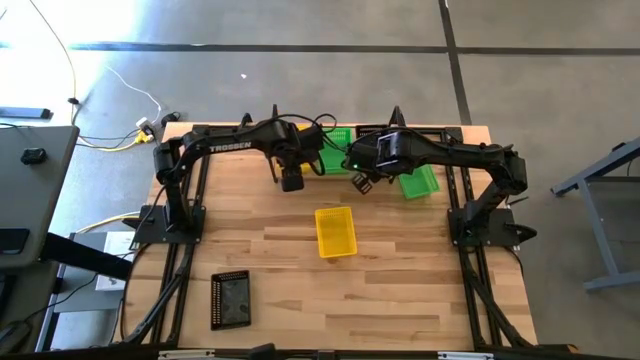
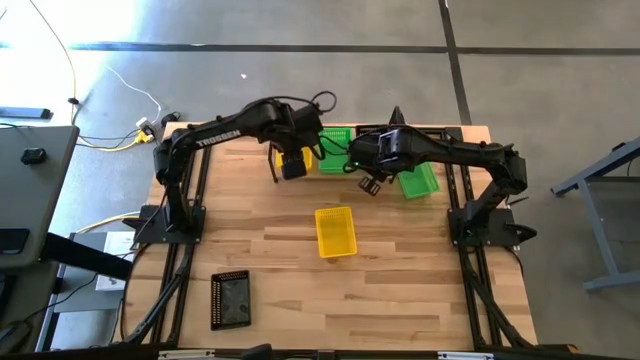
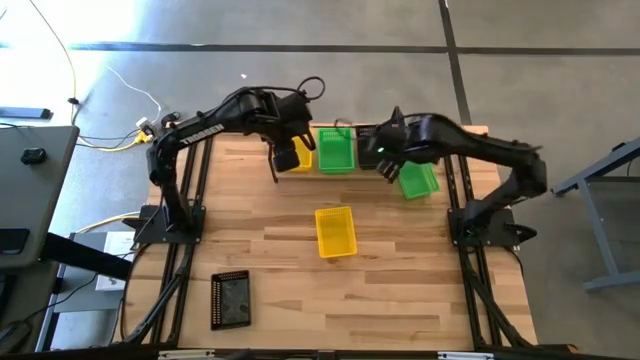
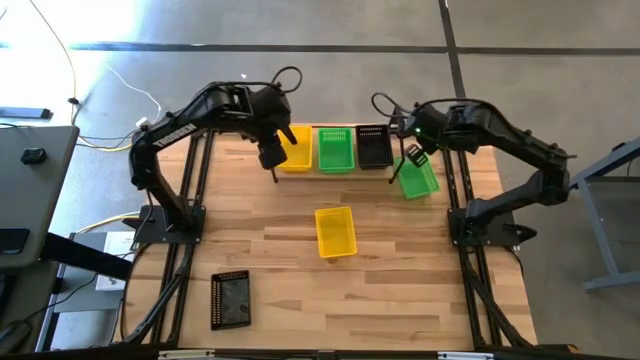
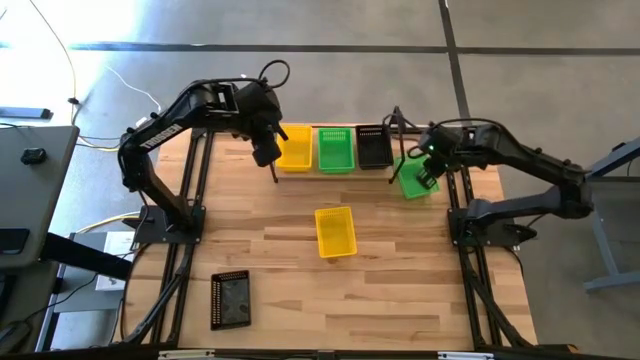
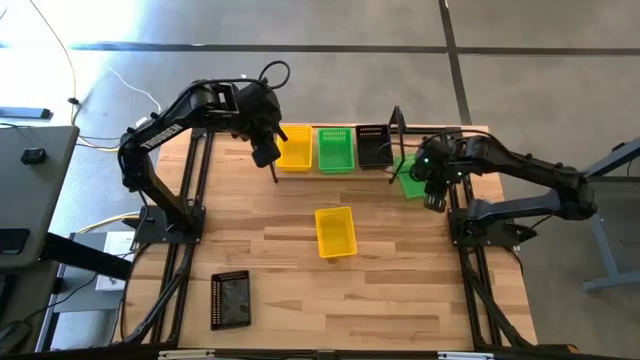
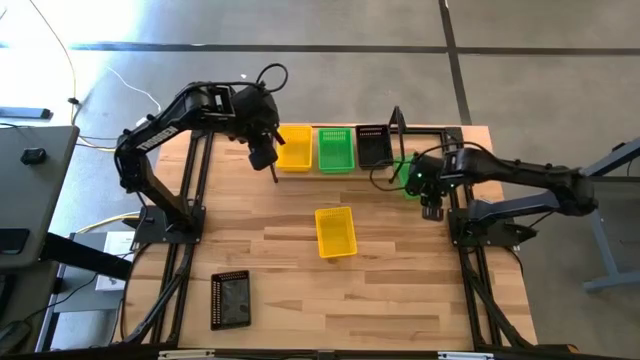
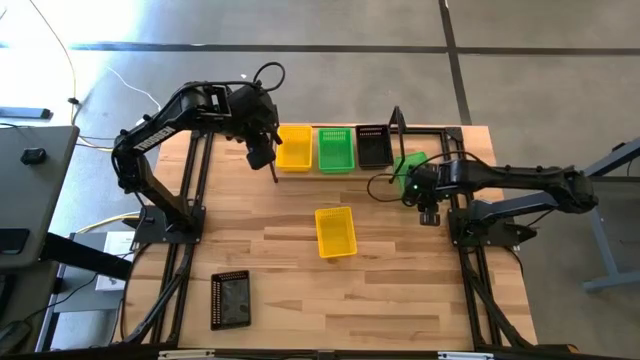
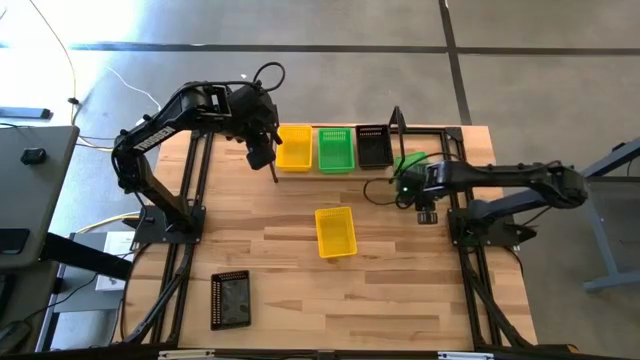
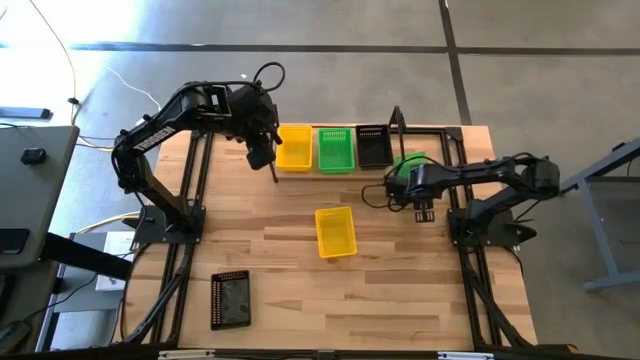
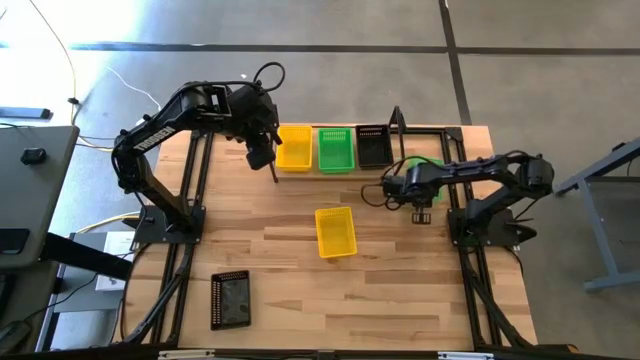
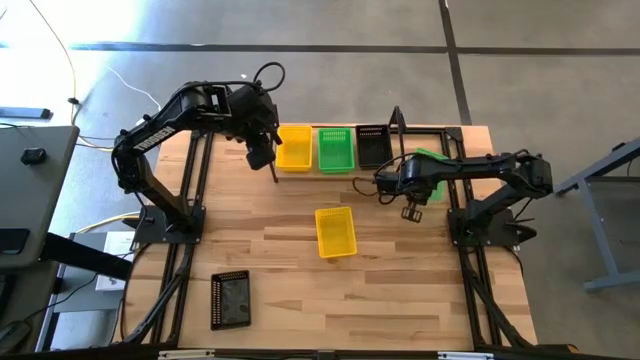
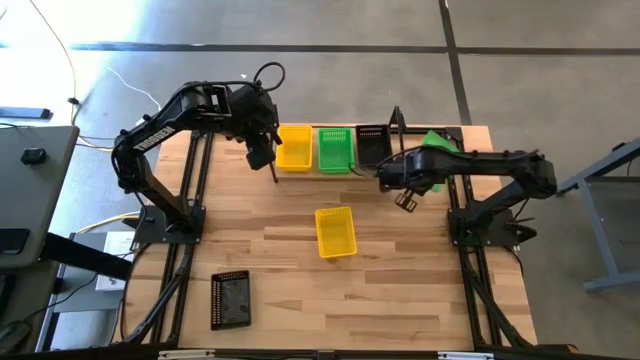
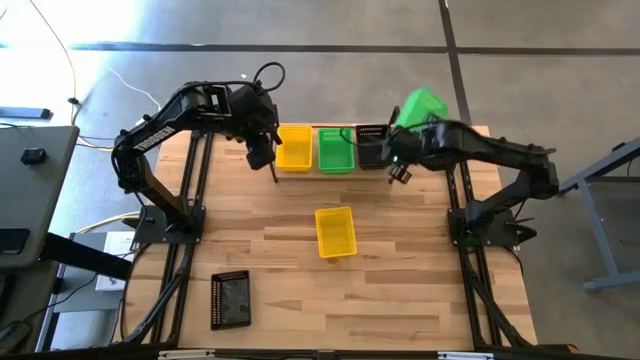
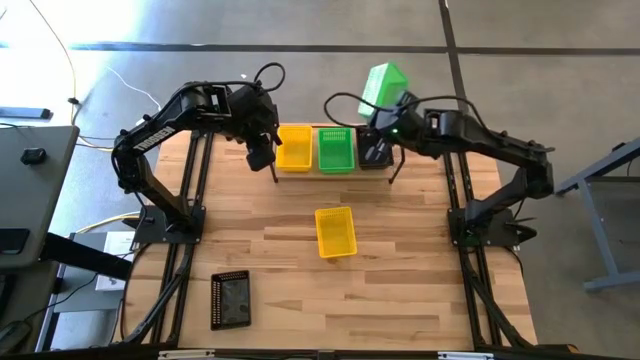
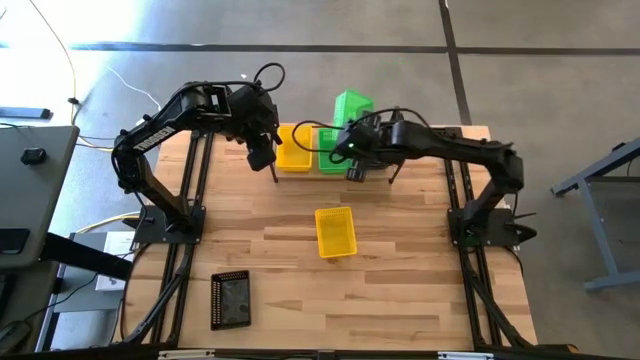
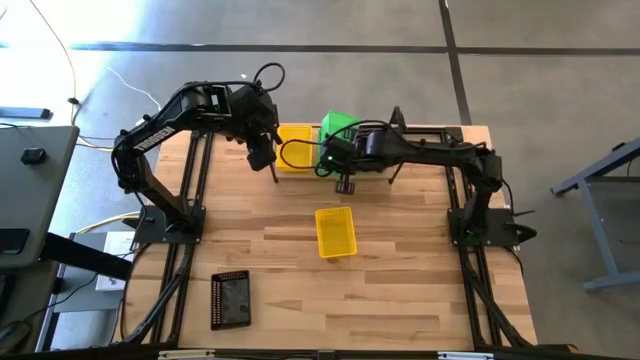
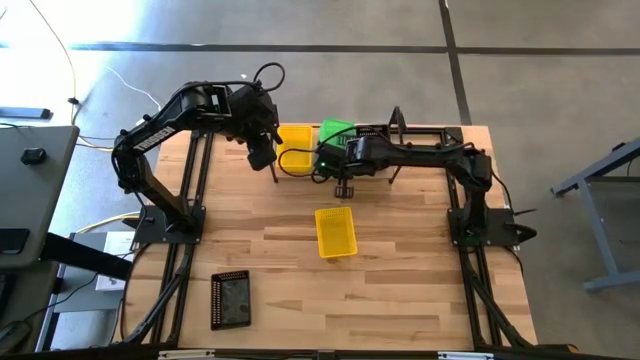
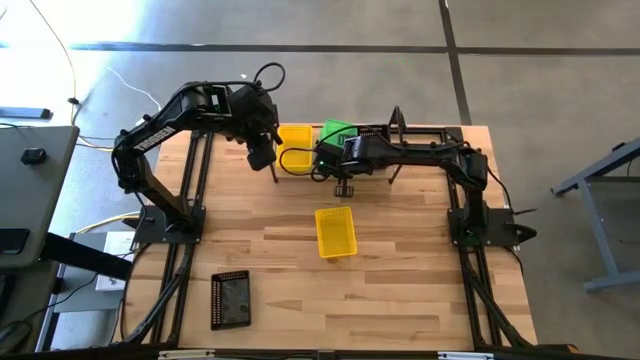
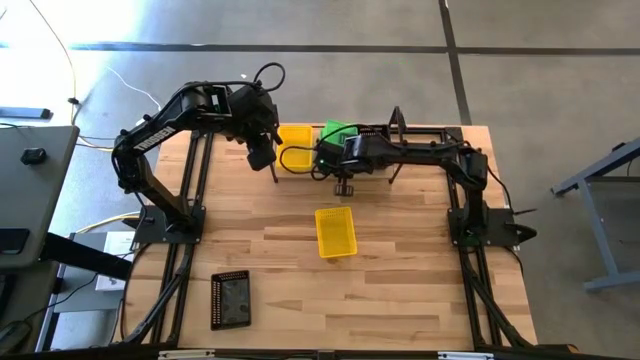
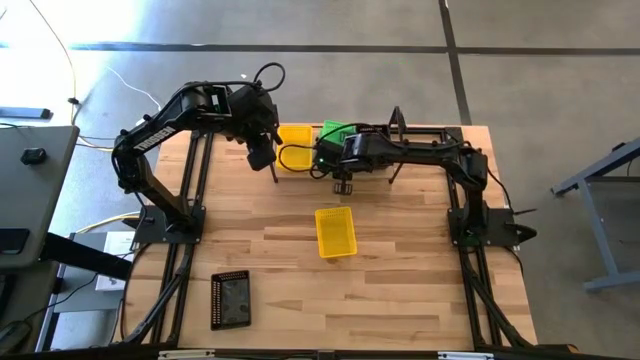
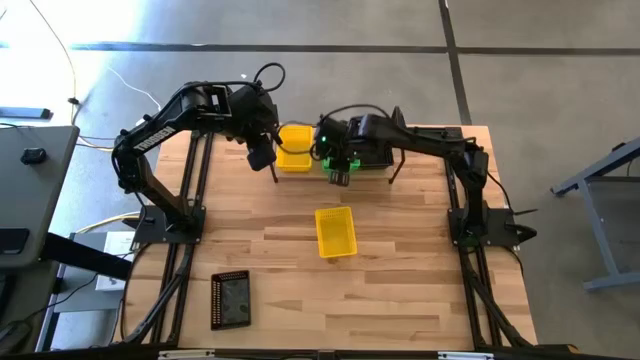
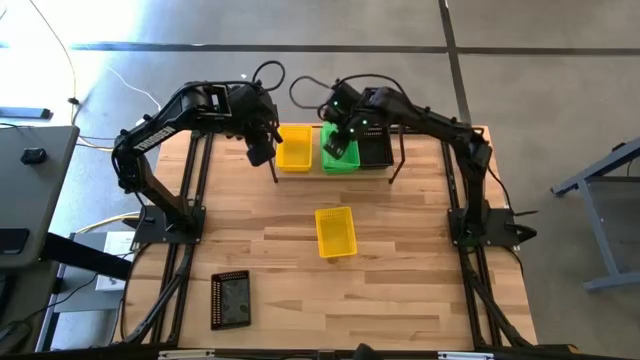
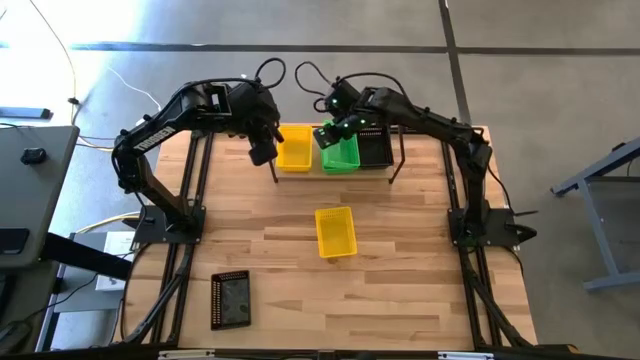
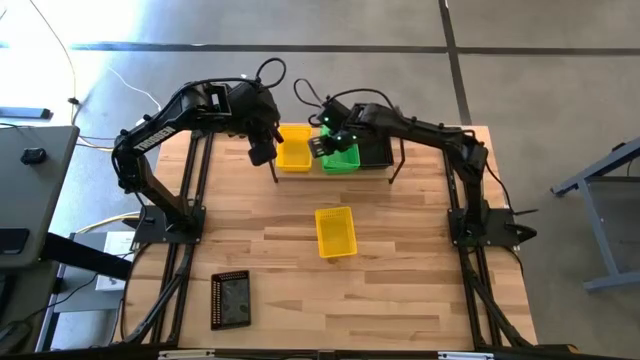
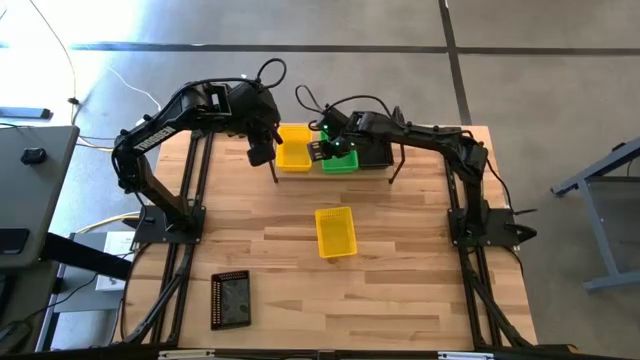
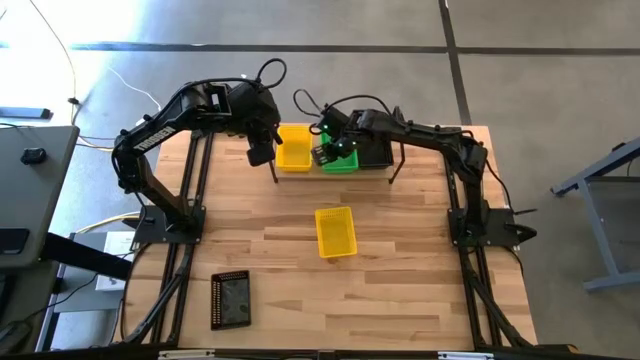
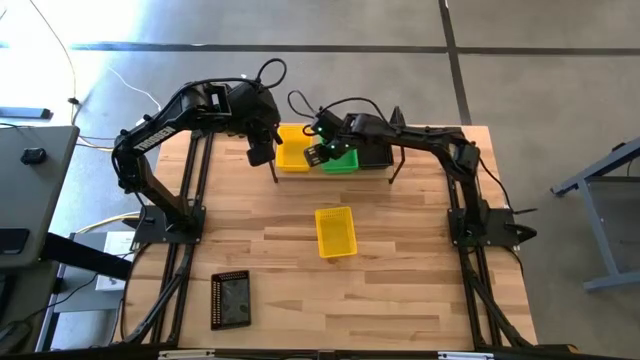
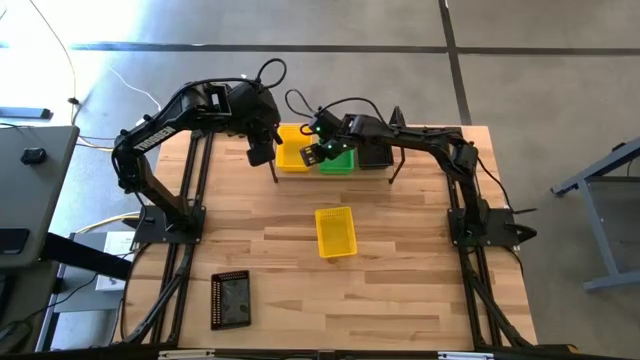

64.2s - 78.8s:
Task: Stack baskets on shelf by color
Stack the green bin on top of the green bins on the shelf

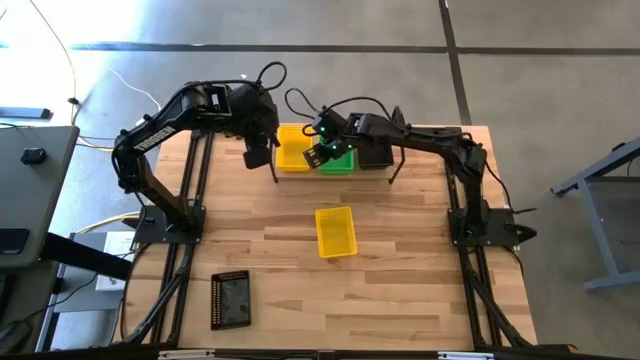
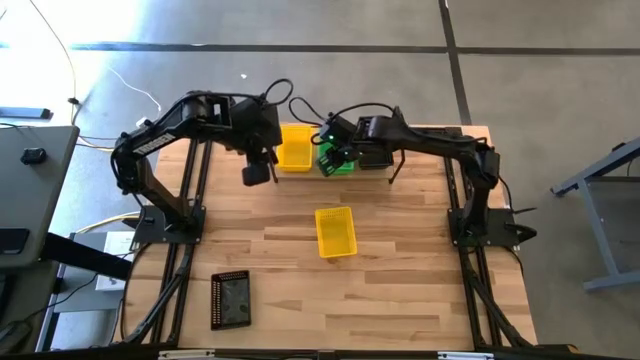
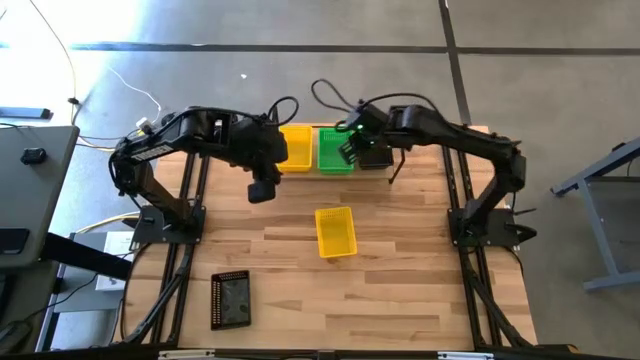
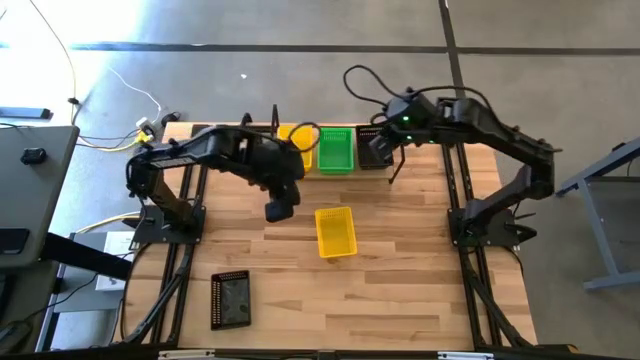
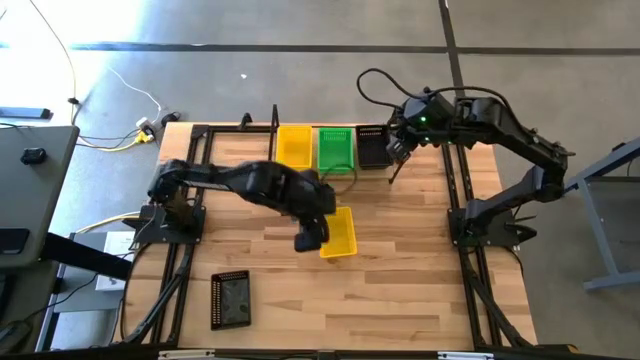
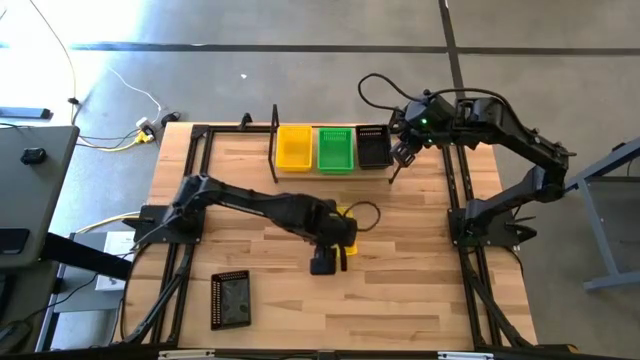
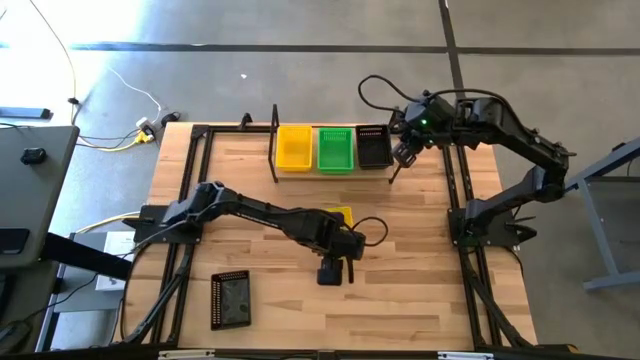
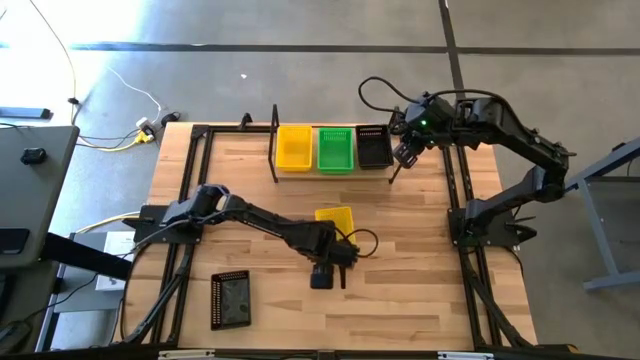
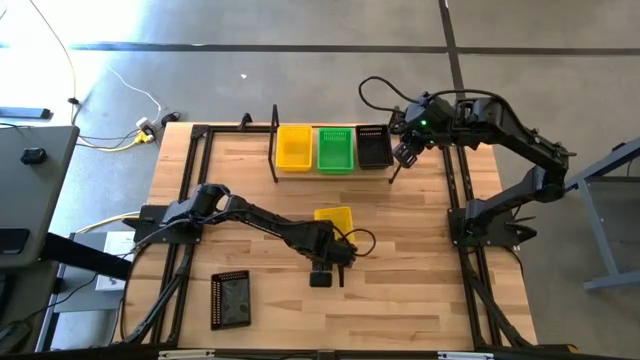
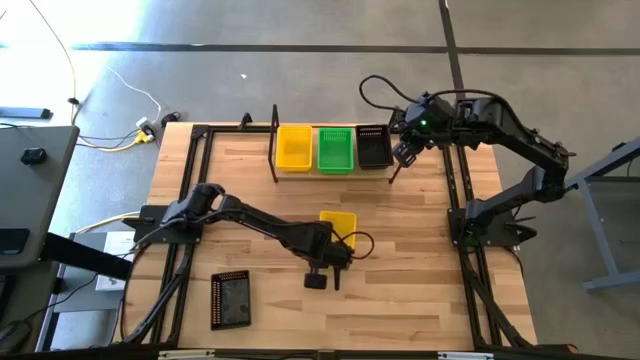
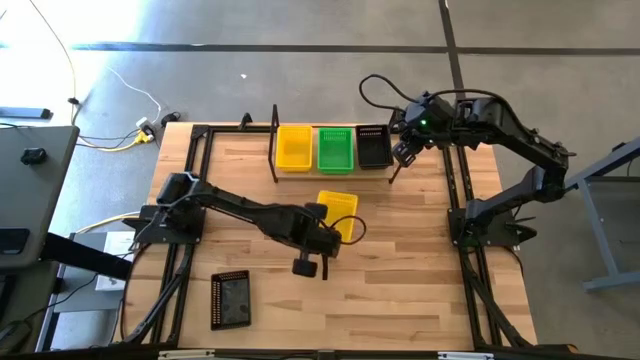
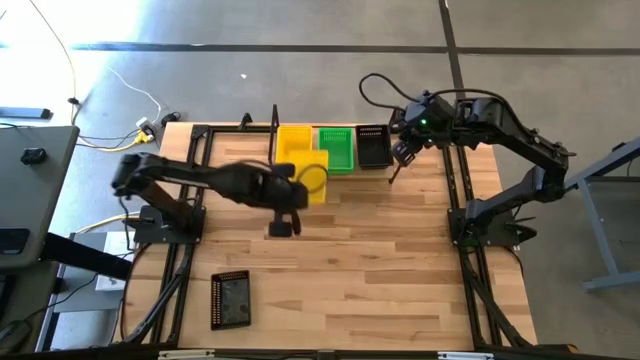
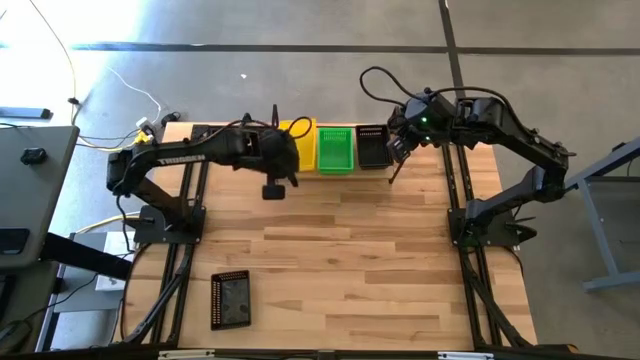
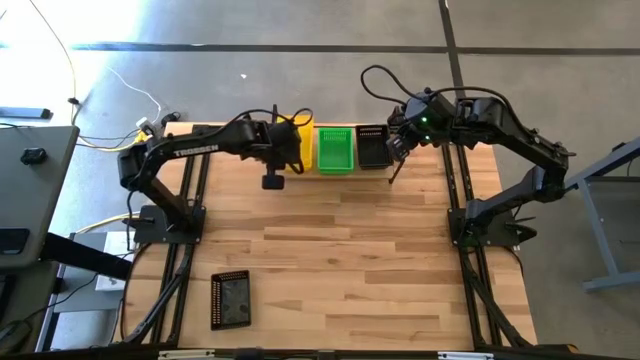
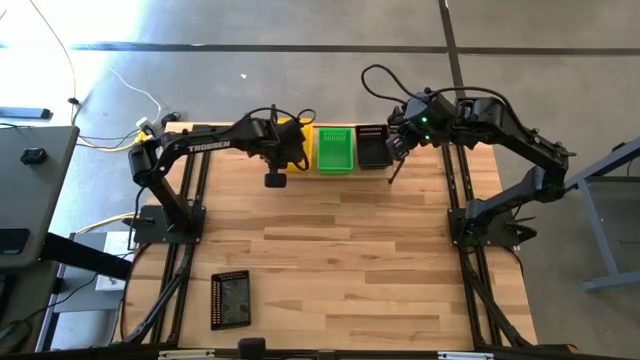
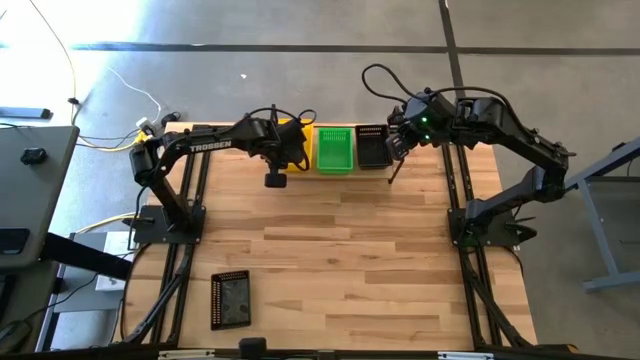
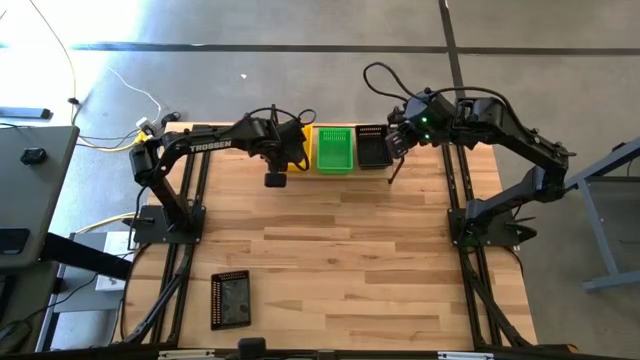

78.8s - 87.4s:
Stack the yellow bin on top of the yellow bins on the shelf
